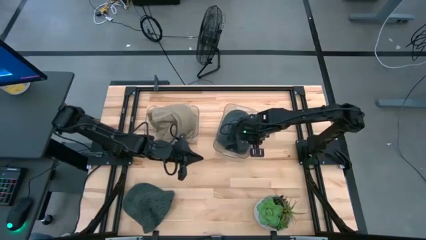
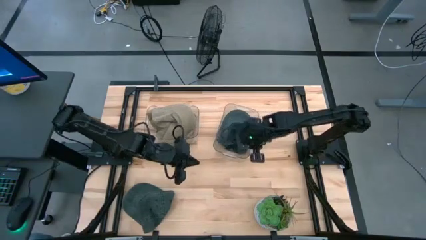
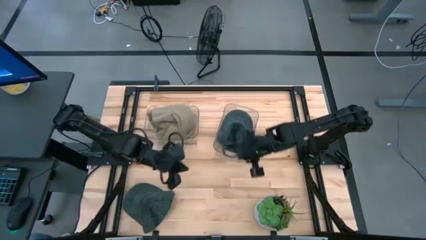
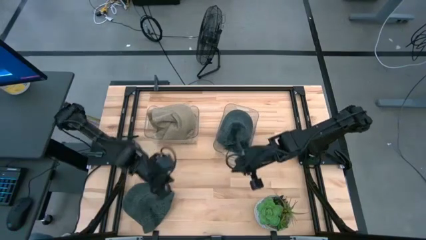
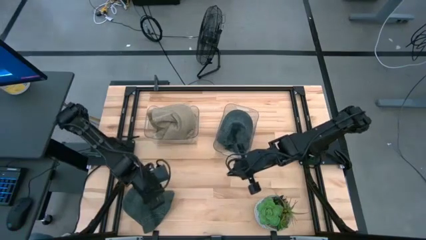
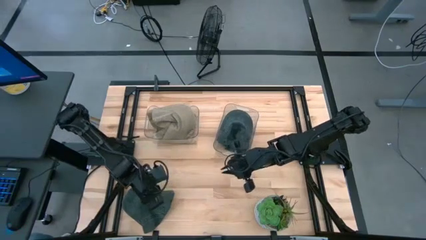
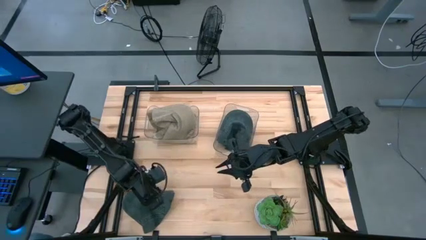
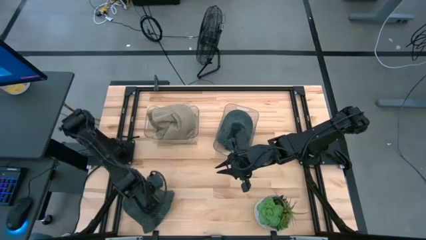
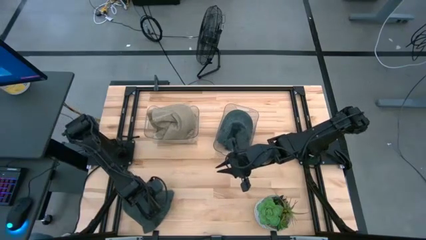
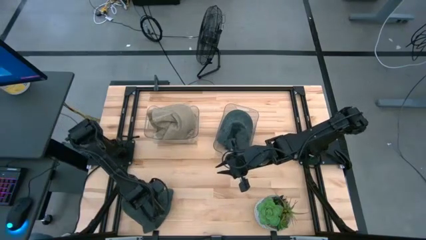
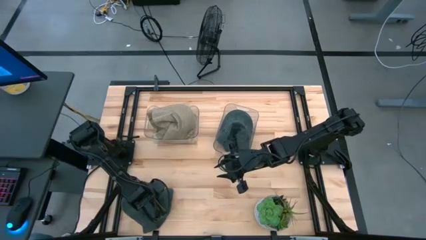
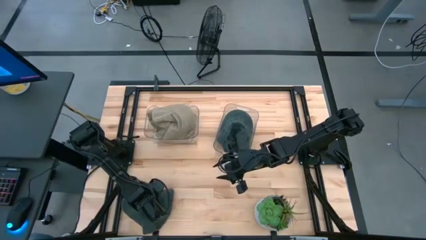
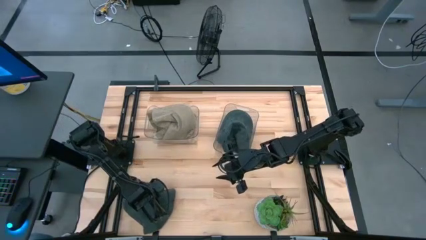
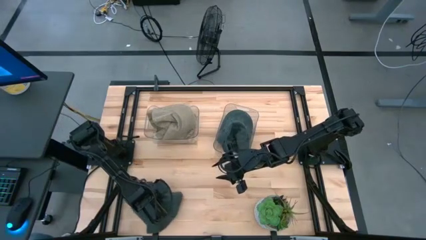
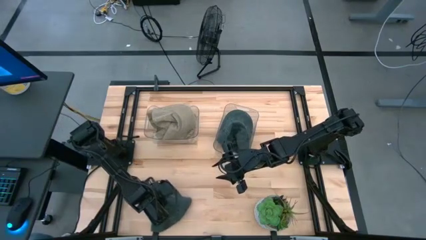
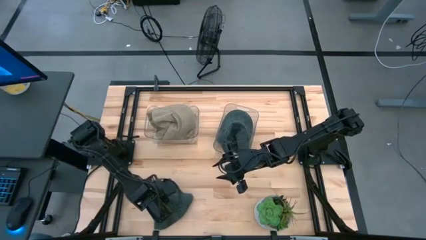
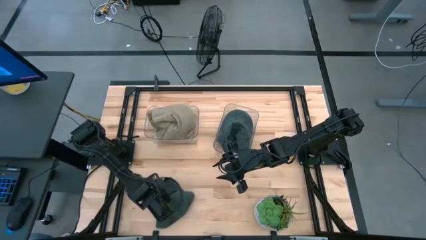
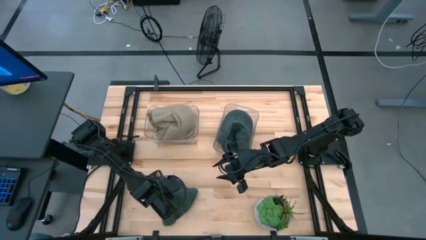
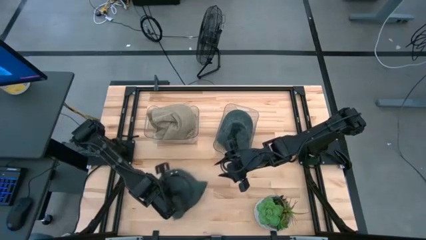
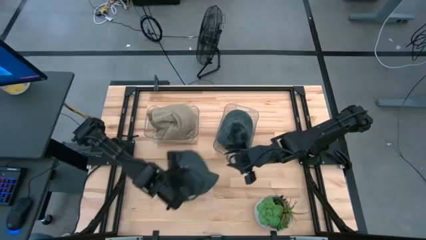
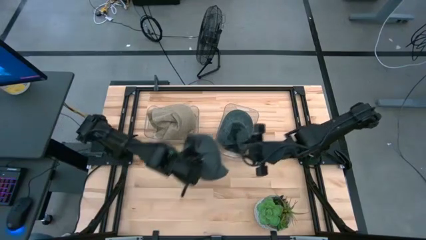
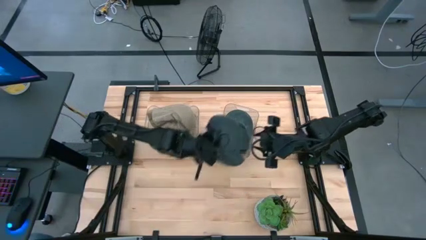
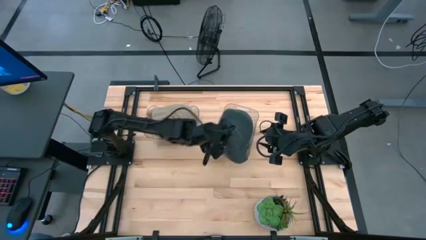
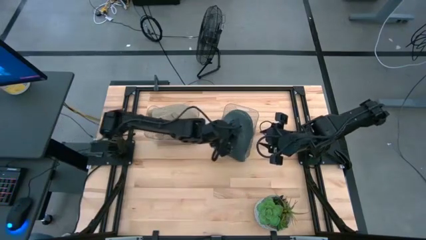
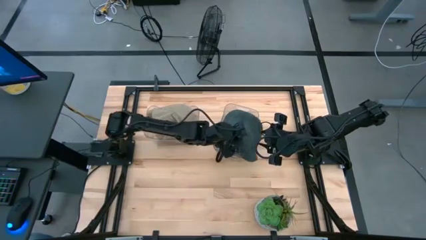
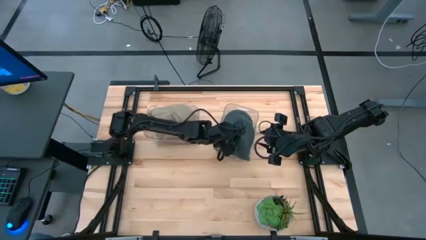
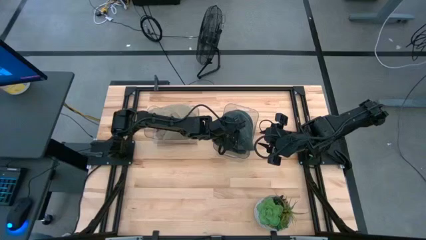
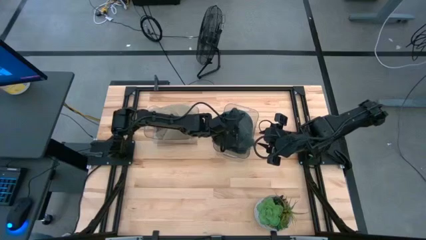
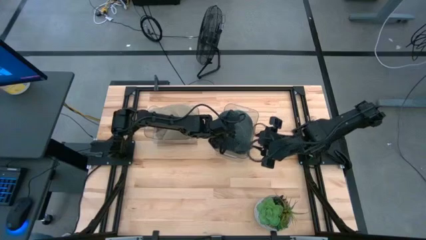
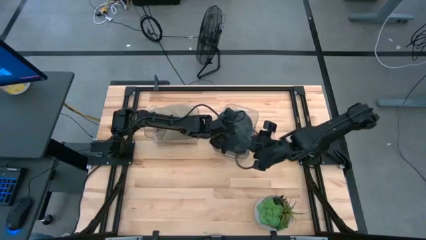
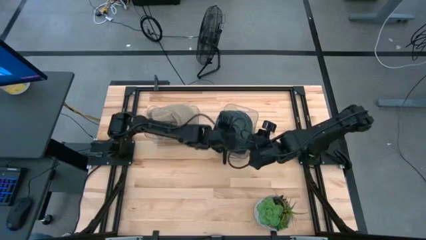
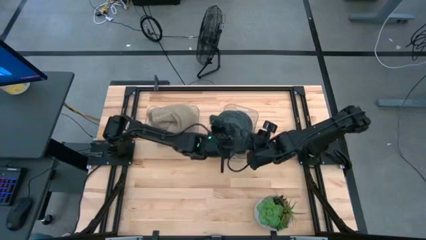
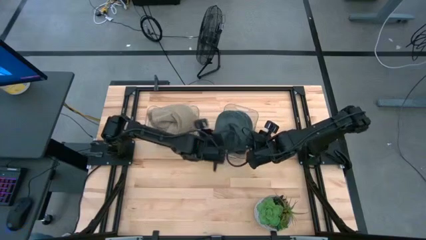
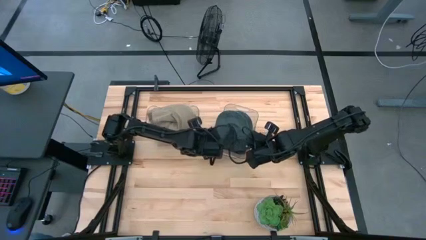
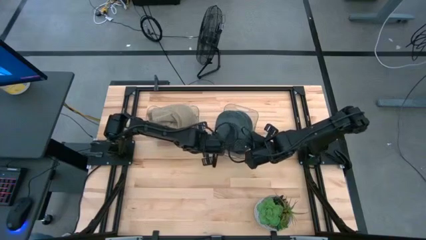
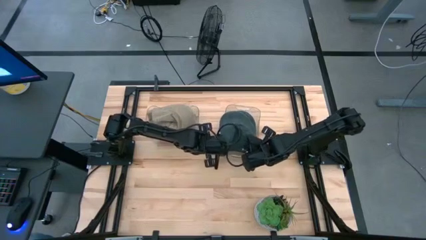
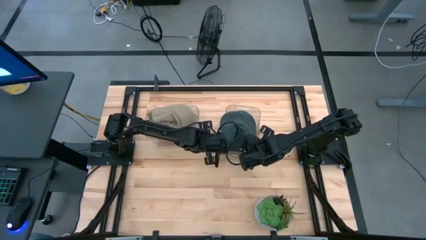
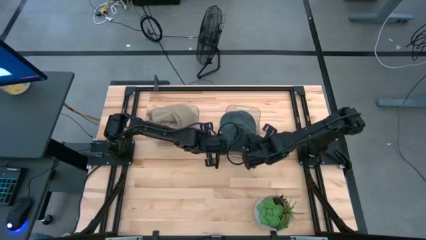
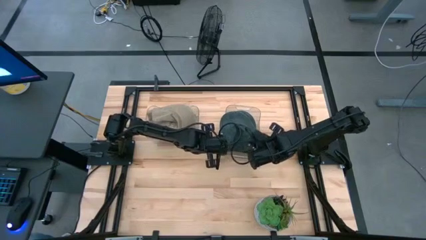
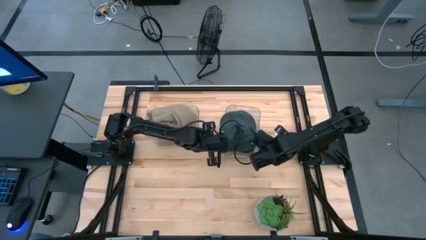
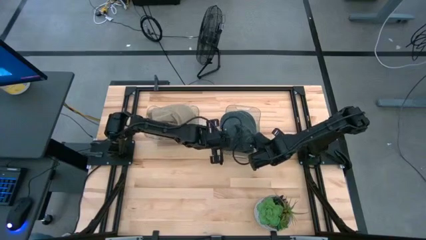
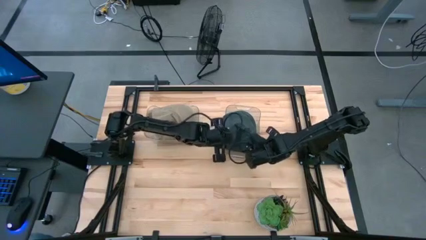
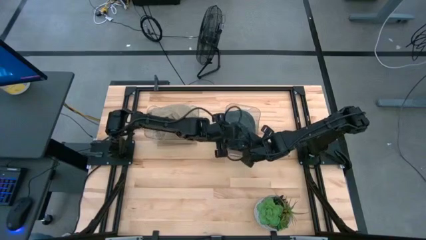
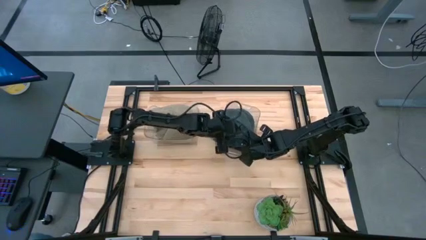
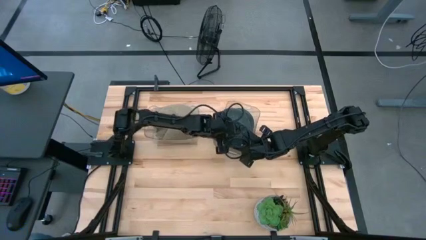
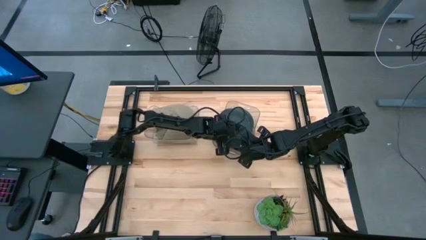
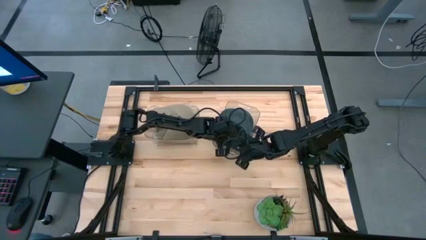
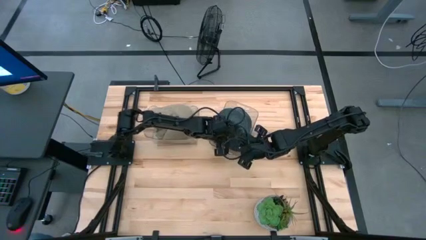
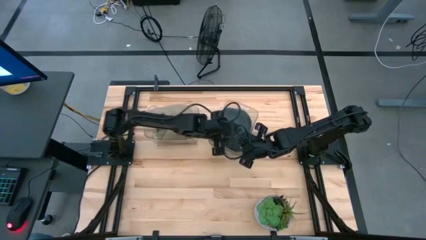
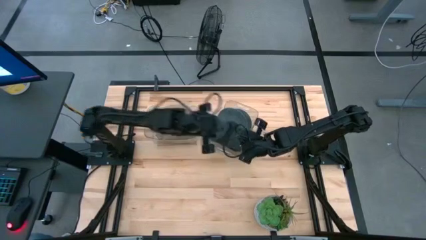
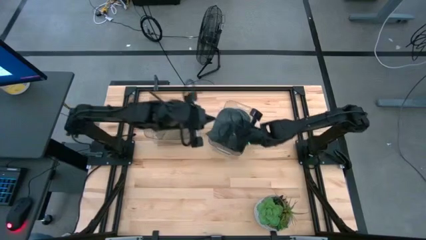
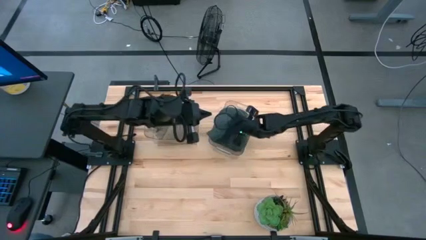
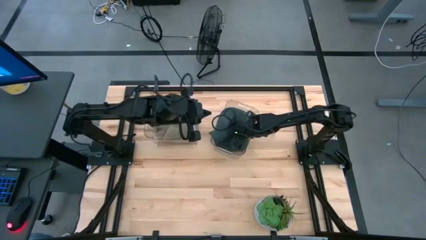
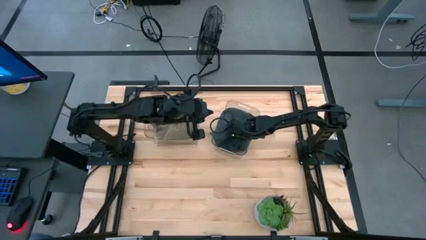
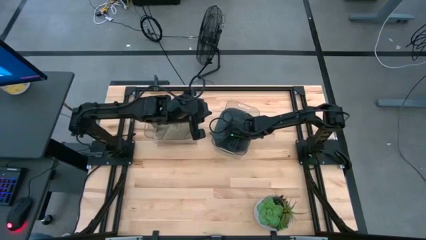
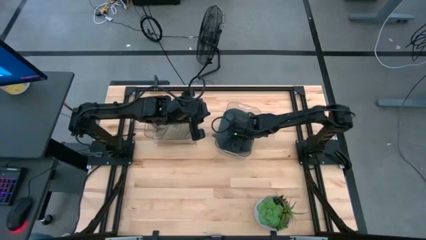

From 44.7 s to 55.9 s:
Task: Pick & Place hat
Stack the black cap into the right transparent bin

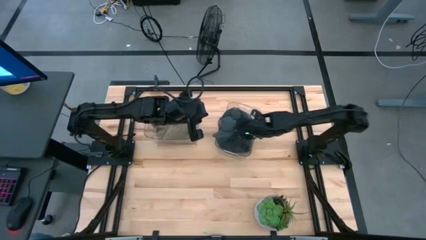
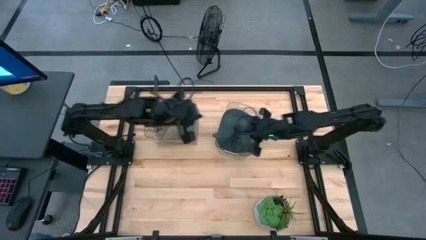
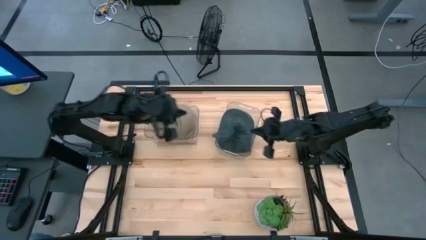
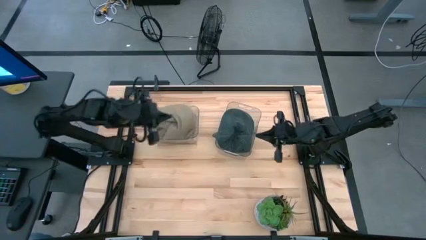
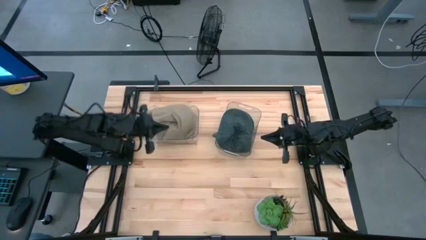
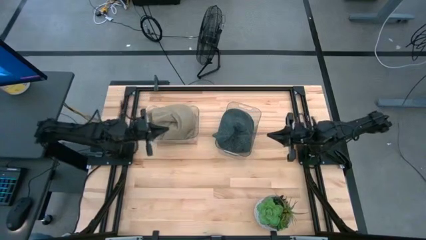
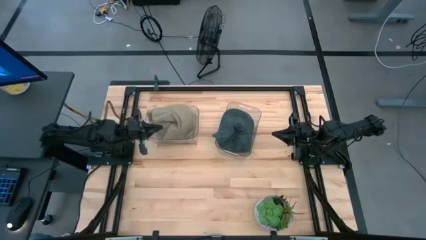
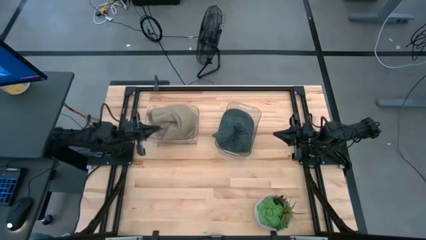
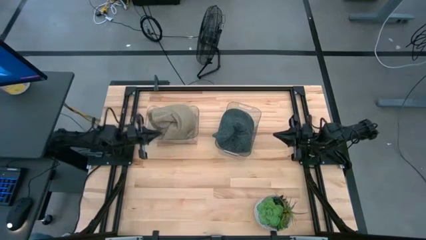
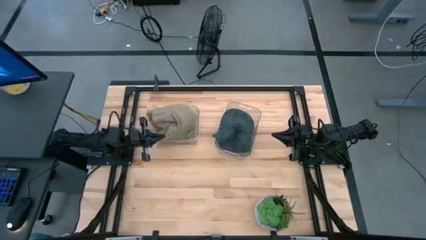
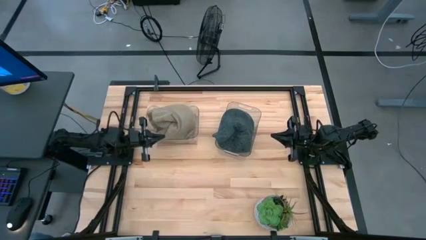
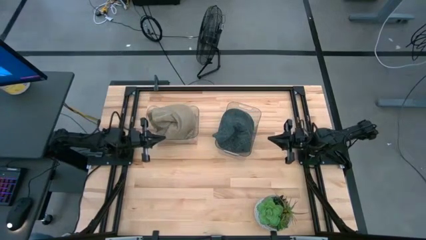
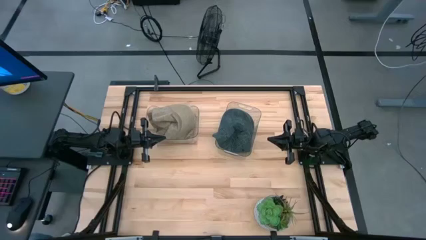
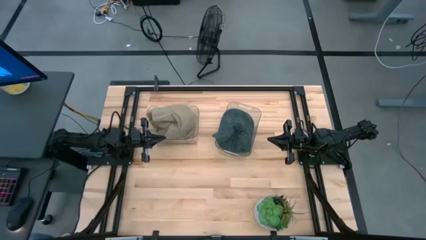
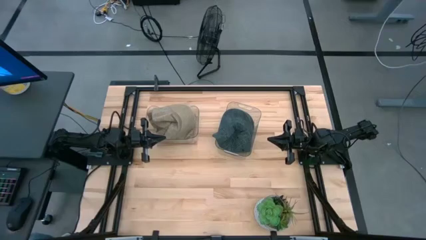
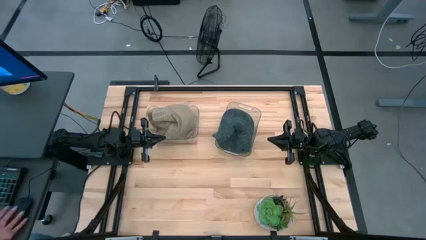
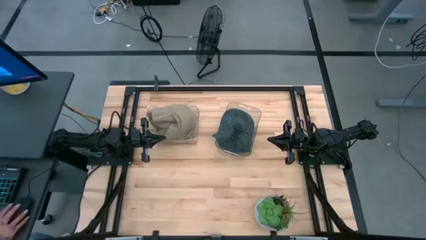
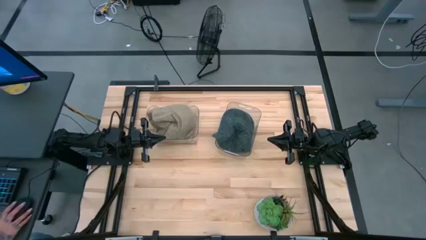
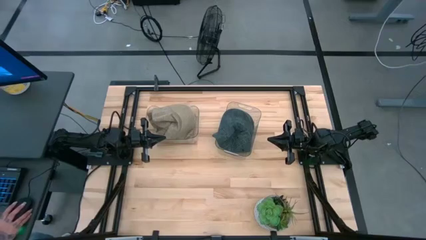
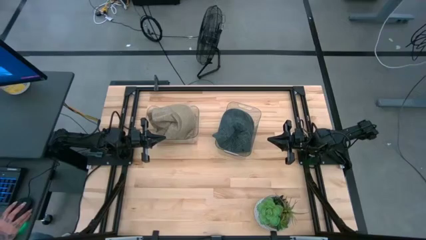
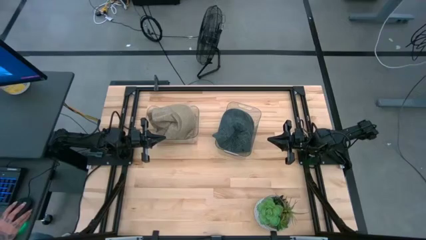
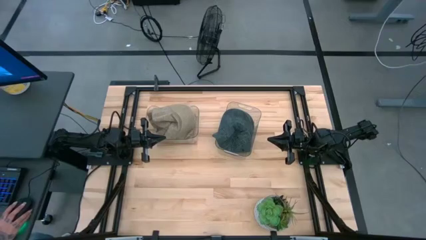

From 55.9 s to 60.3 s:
Return to Home Position
